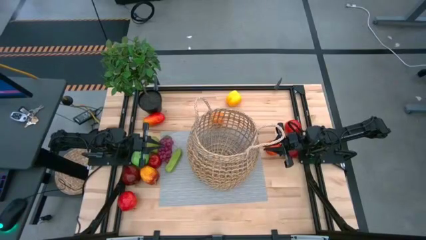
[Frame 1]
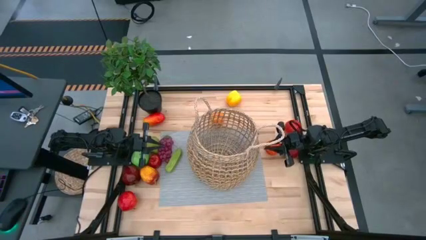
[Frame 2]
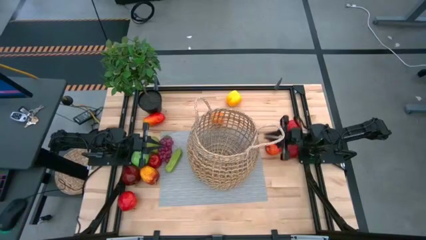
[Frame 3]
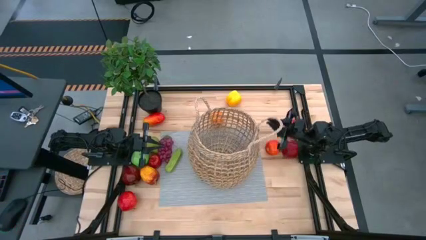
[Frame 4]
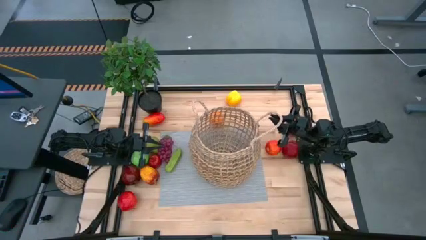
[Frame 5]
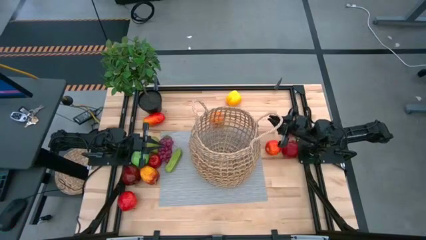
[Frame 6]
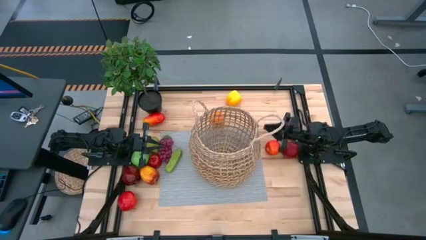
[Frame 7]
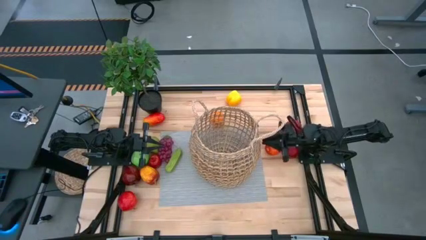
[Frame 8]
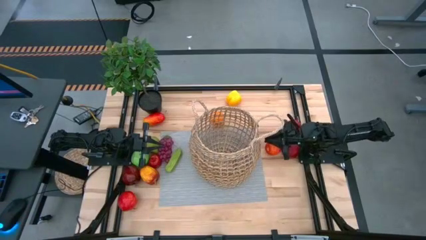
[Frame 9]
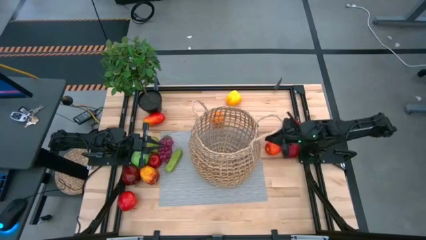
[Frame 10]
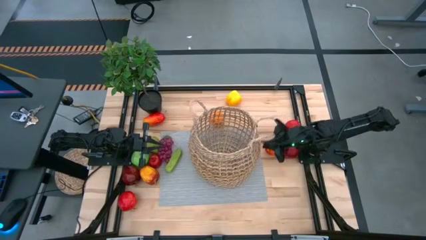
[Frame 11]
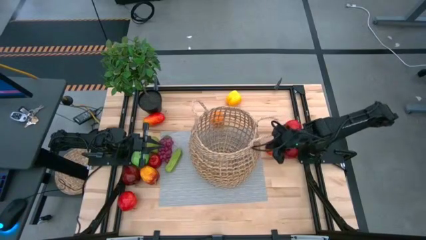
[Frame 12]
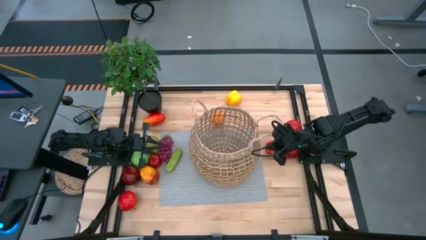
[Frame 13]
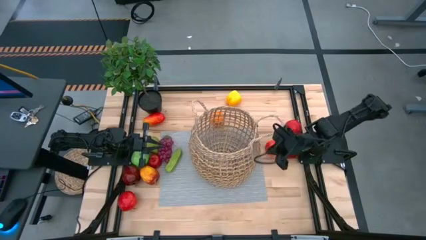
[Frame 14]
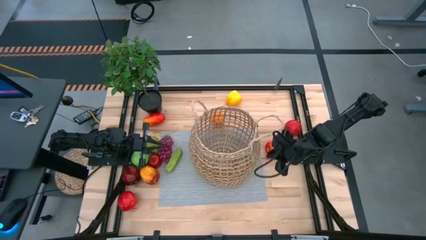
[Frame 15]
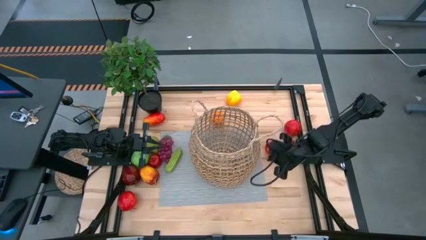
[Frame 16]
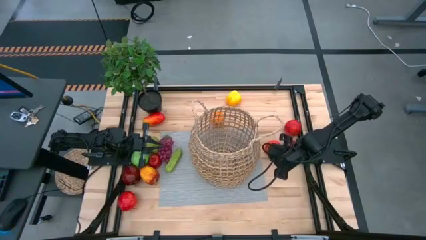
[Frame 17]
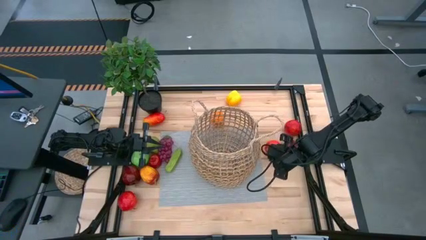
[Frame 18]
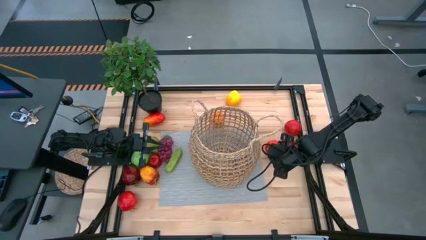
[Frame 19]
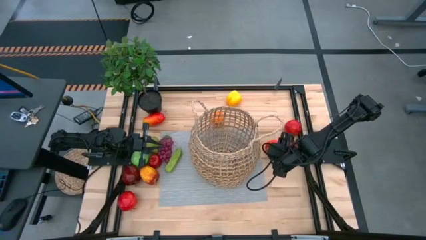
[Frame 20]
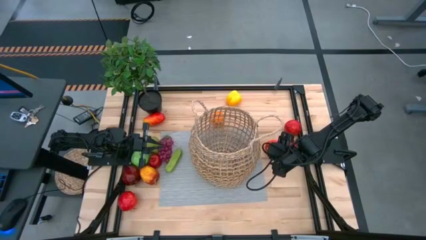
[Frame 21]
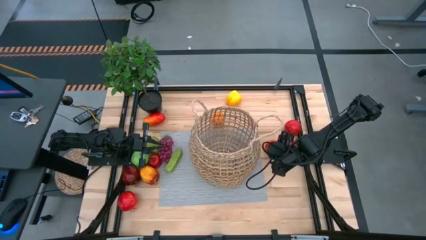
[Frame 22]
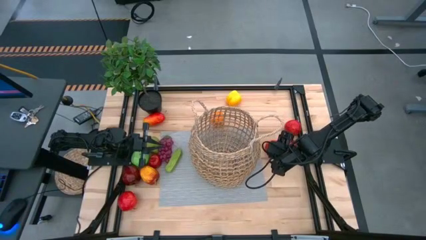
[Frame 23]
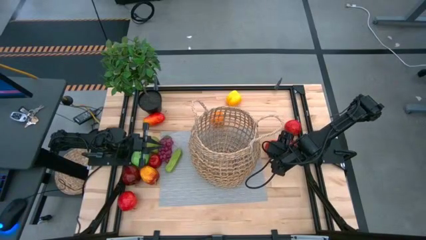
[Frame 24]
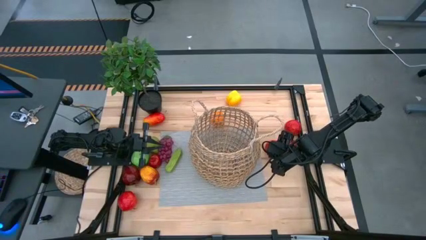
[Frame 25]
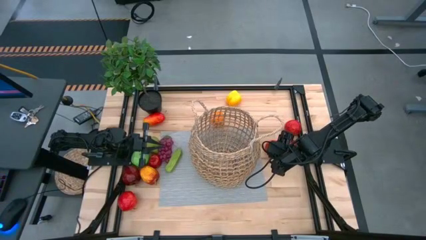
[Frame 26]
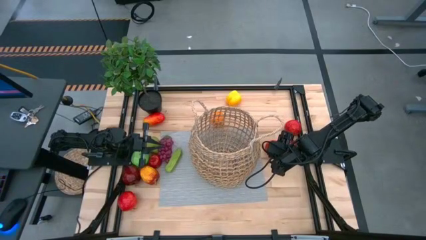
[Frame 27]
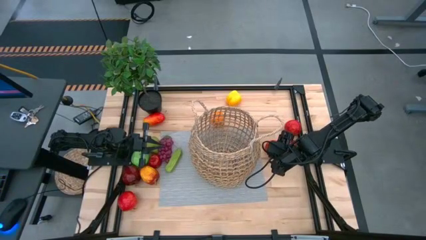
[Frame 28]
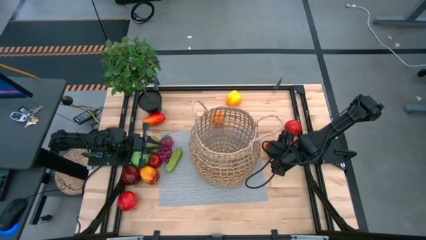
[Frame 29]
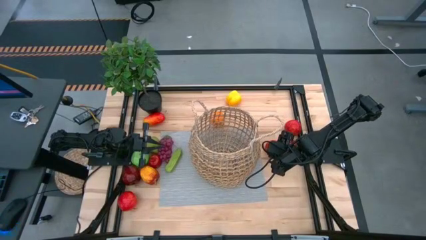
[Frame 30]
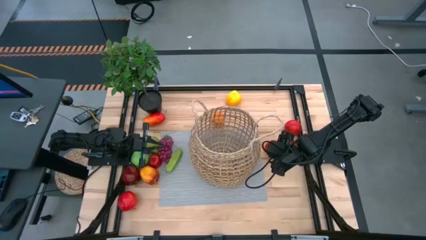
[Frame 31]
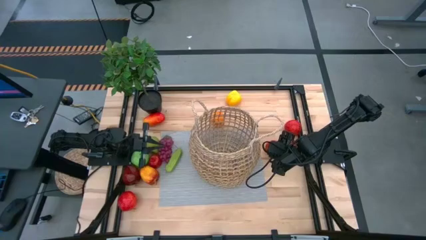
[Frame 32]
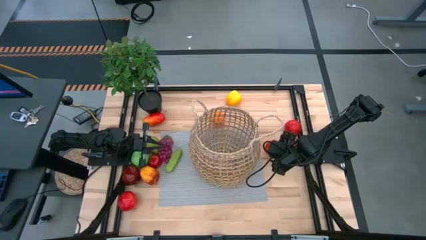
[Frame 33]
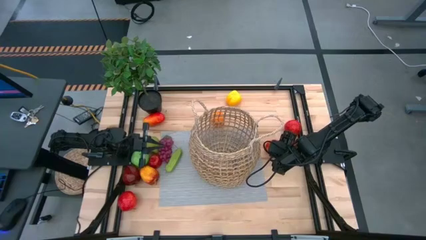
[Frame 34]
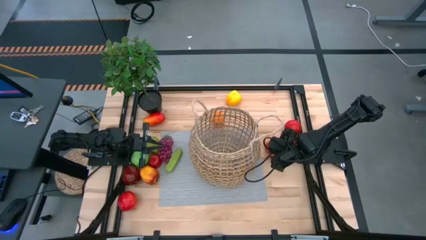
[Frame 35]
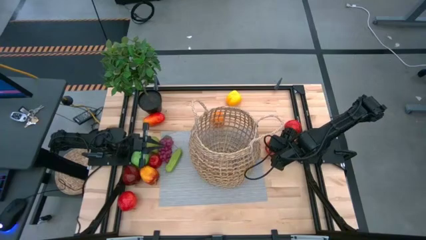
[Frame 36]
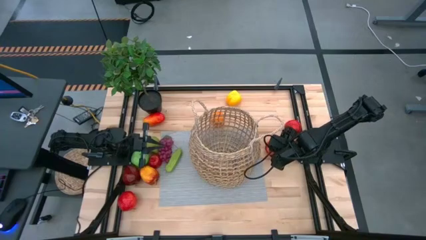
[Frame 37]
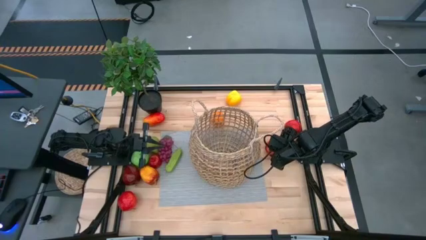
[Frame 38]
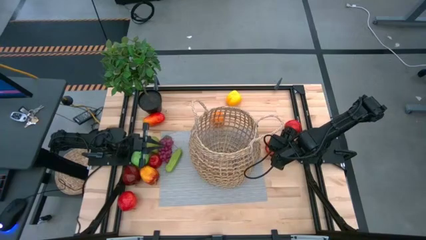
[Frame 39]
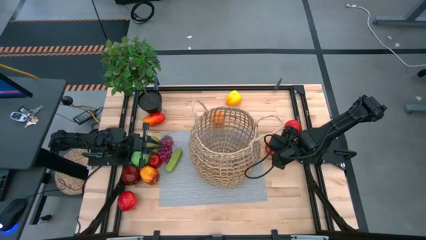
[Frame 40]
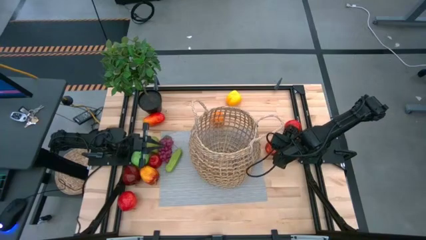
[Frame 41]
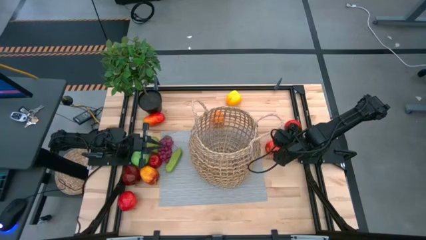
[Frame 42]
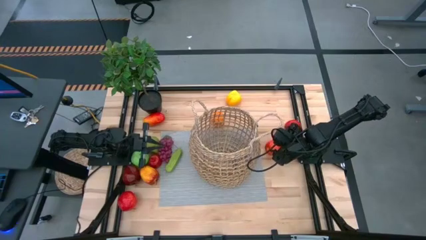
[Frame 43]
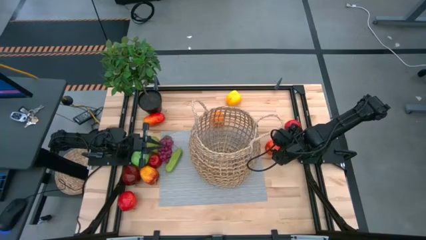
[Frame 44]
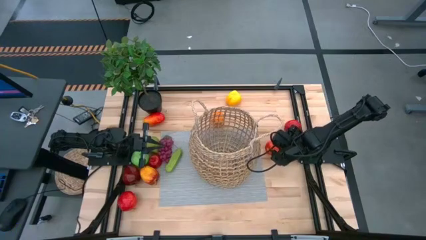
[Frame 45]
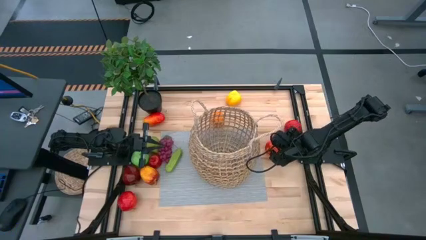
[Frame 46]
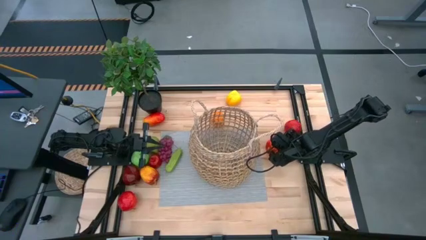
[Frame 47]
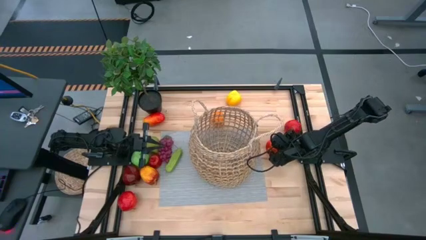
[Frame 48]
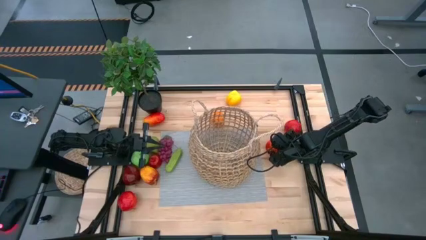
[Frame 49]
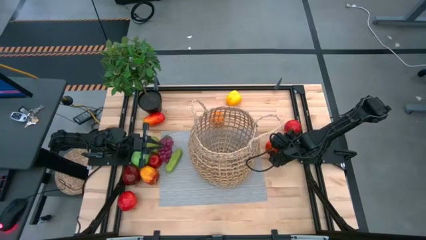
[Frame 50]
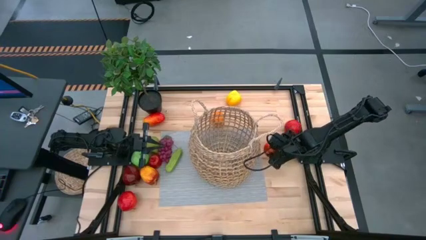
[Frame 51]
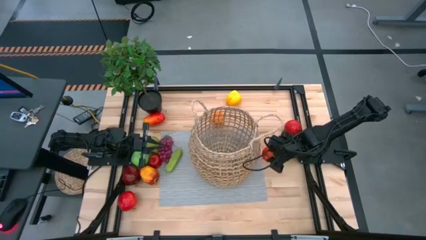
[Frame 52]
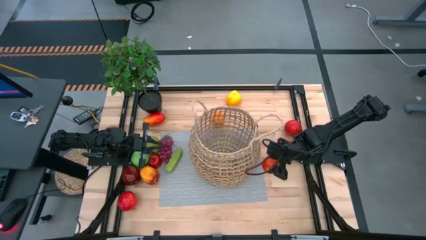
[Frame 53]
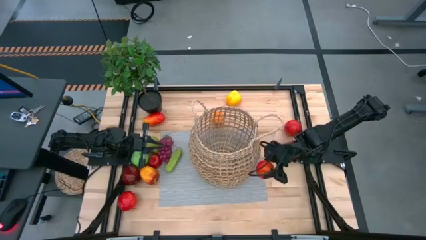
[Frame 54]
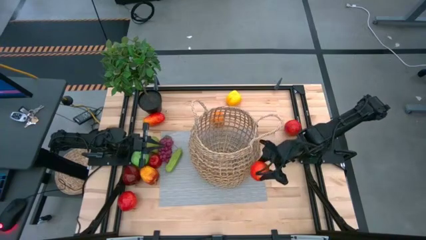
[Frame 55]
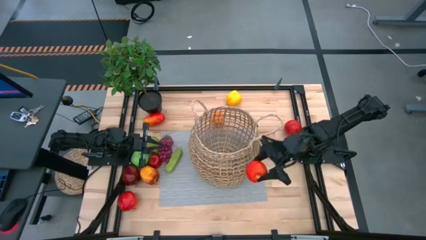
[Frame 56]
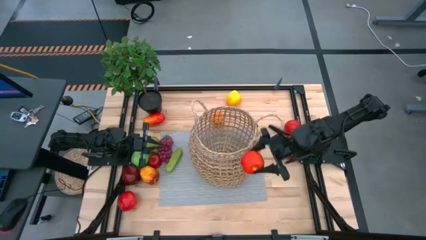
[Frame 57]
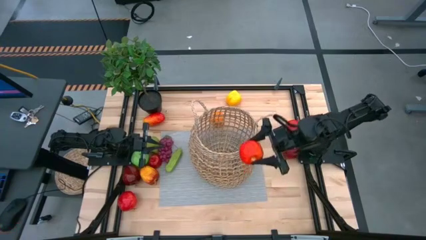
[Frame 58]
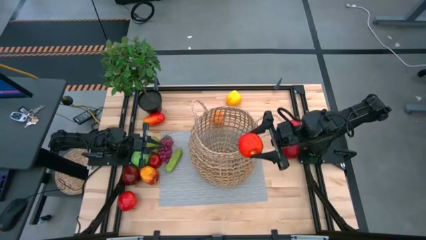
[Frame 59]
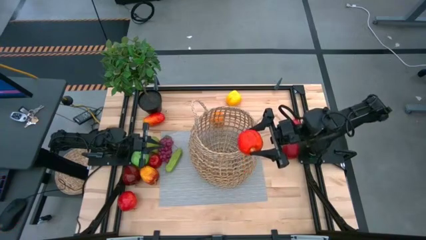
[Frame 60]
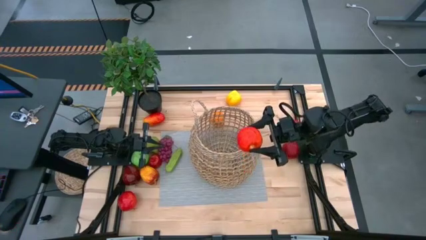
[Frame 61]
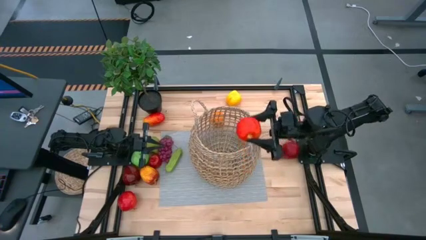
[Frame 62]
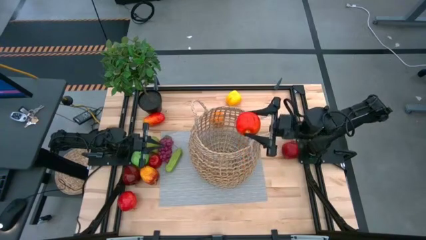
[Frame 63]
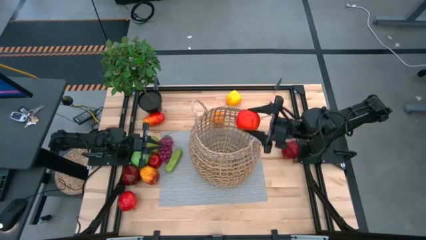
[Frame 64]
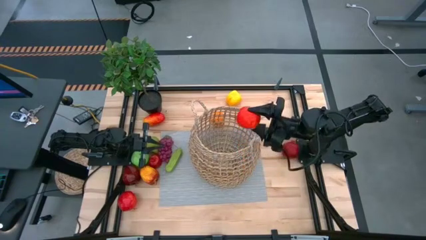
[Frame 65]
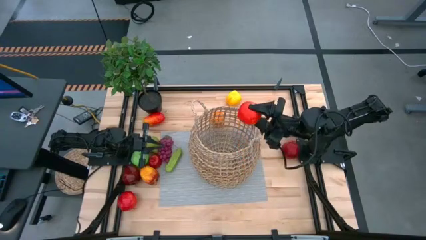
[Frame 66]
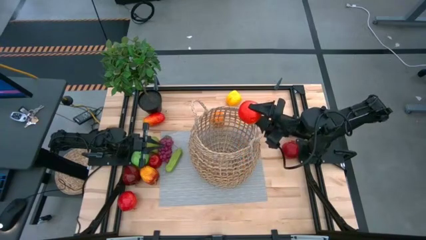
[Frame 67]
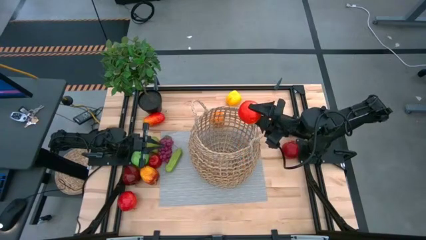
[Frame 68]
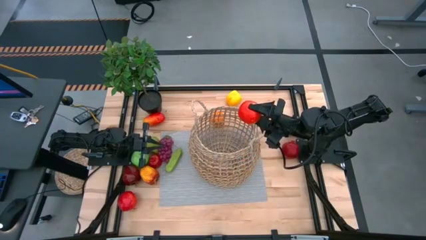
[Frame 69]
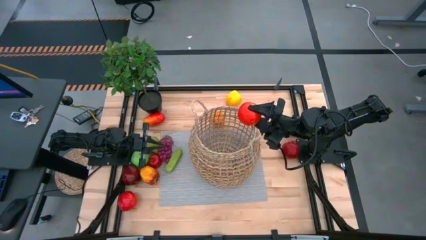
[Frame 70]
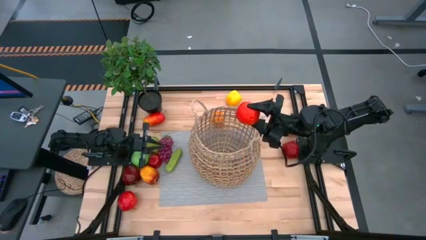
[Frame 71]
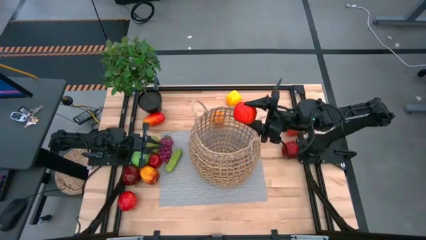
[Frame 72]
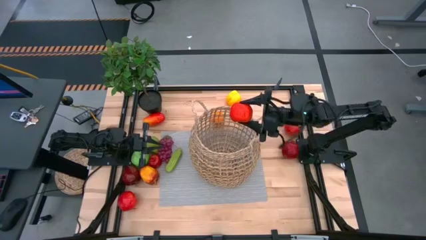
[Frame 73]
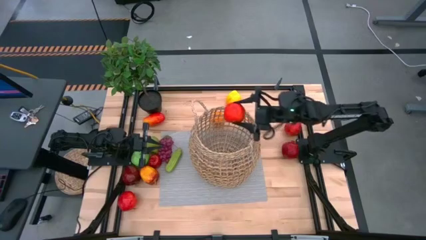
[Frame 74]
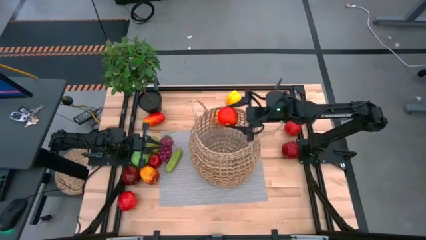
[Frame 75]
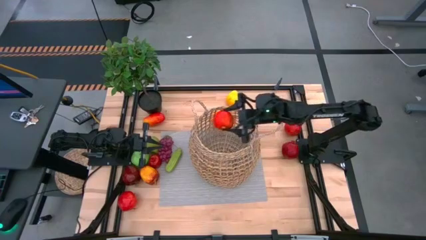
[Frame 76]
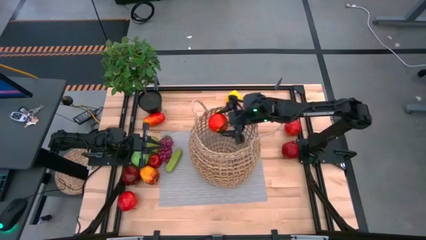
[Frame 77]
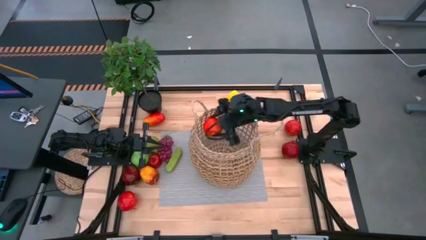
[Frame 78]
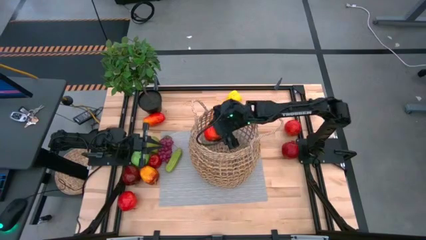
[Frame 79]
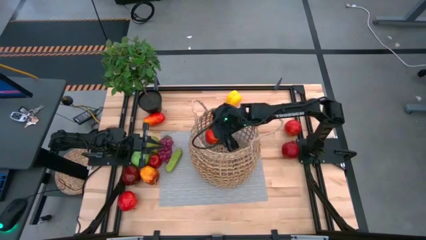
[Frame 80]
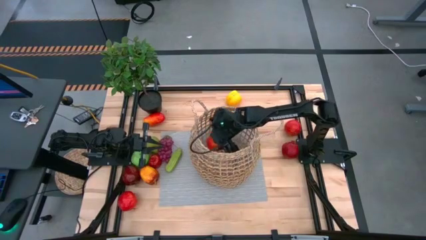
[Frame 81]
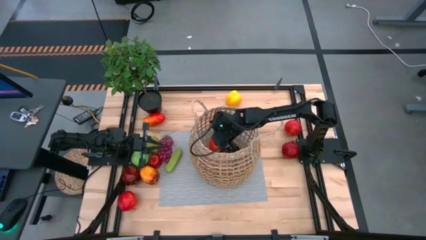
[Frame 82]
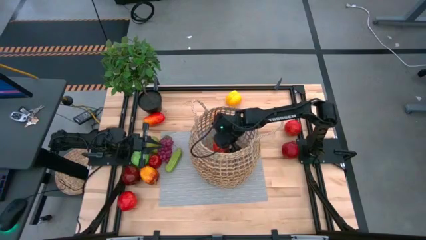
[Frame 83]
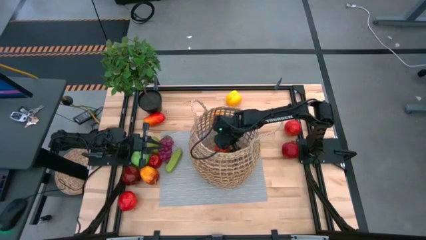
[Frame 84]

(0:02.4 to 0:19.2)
Task: Build produce basket
Put the red apple into the brown basket
